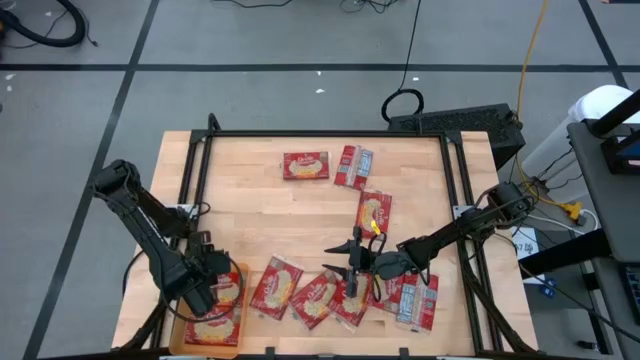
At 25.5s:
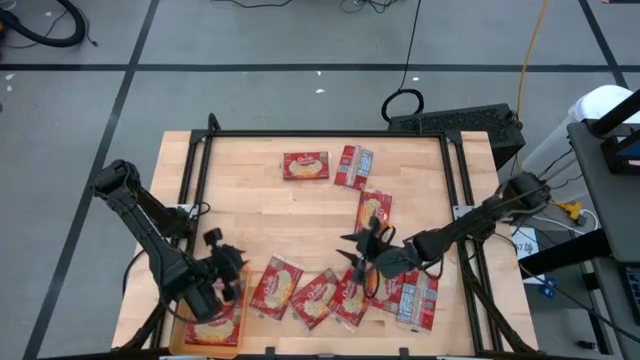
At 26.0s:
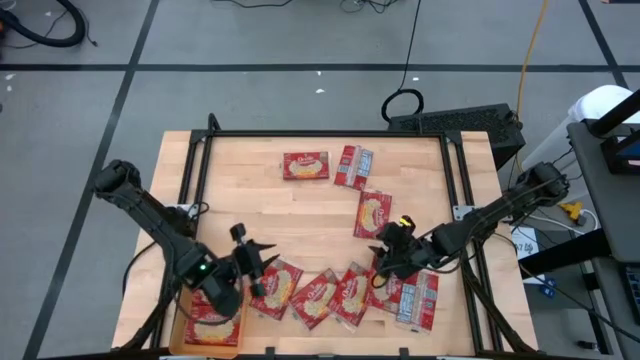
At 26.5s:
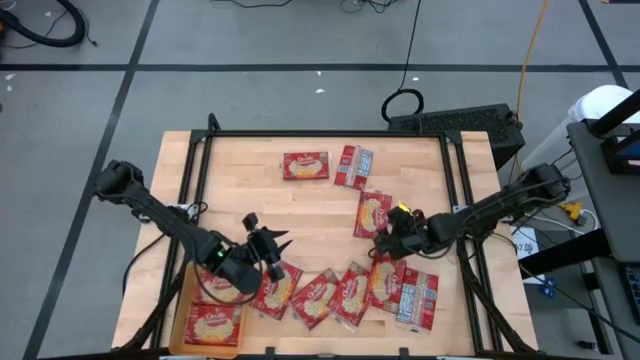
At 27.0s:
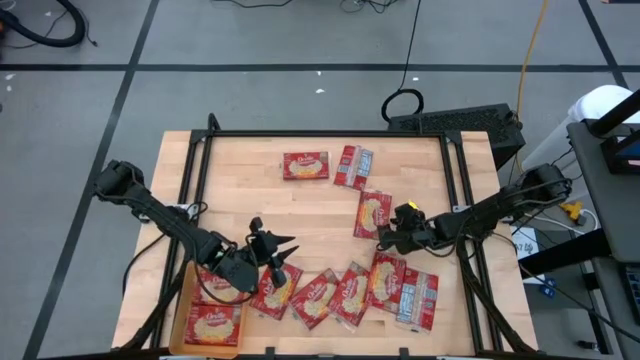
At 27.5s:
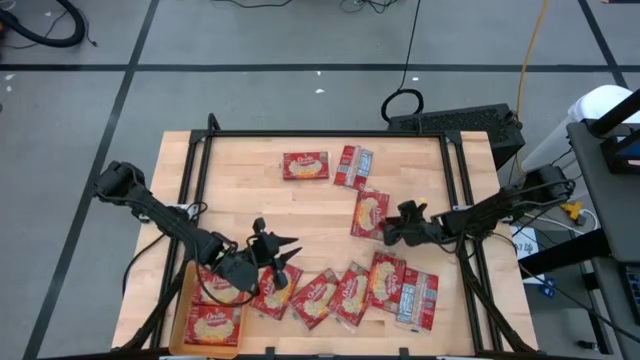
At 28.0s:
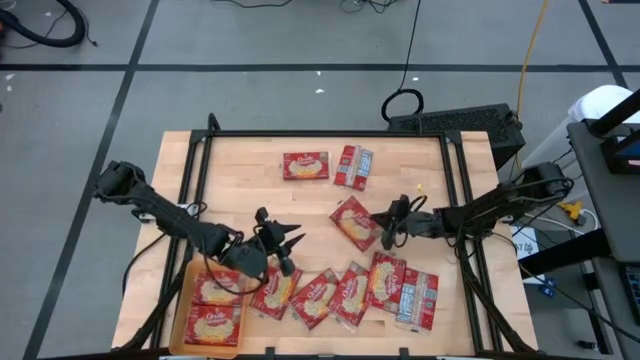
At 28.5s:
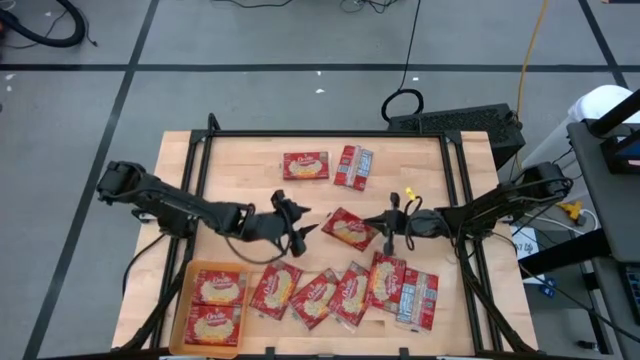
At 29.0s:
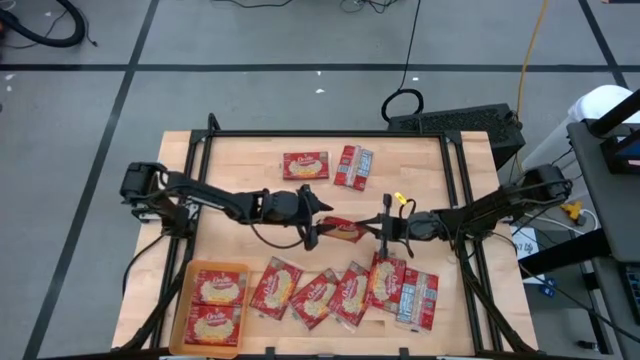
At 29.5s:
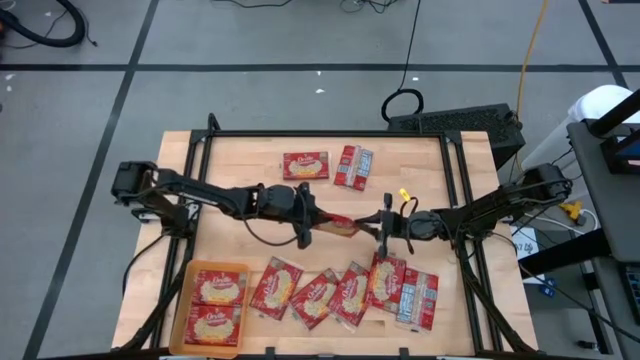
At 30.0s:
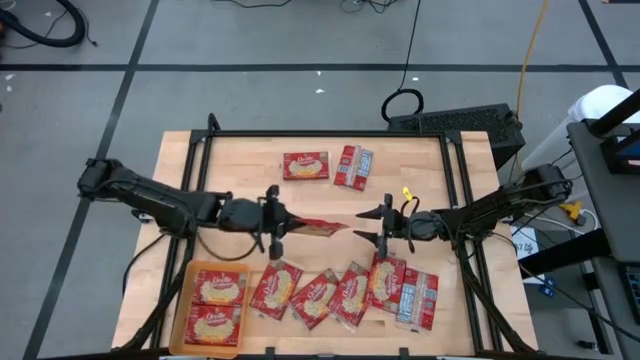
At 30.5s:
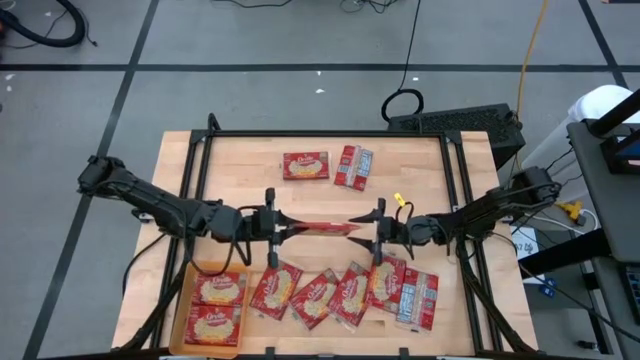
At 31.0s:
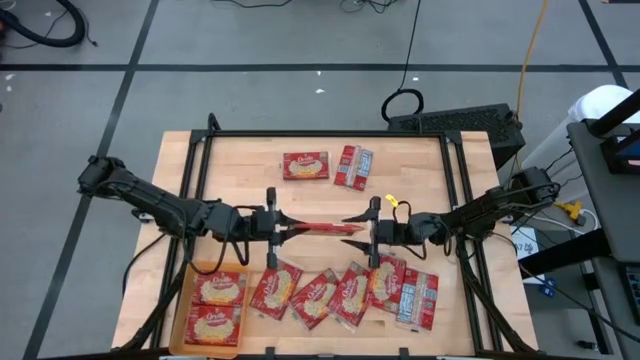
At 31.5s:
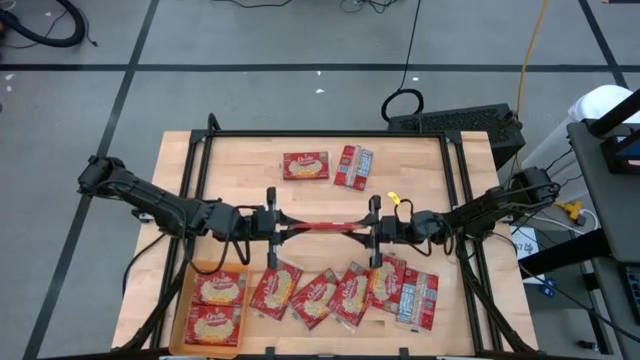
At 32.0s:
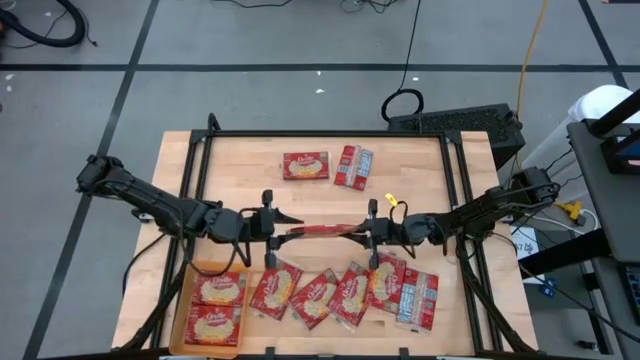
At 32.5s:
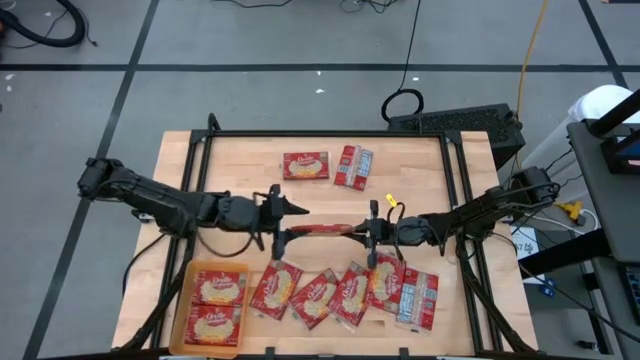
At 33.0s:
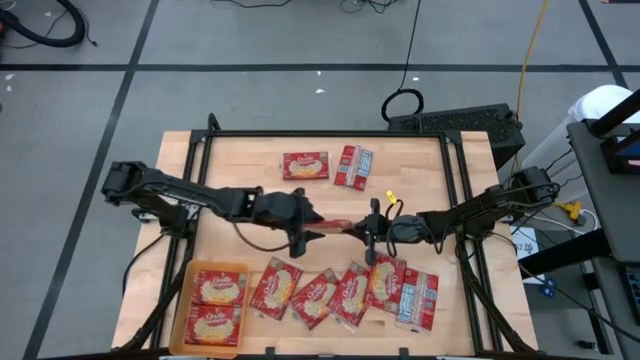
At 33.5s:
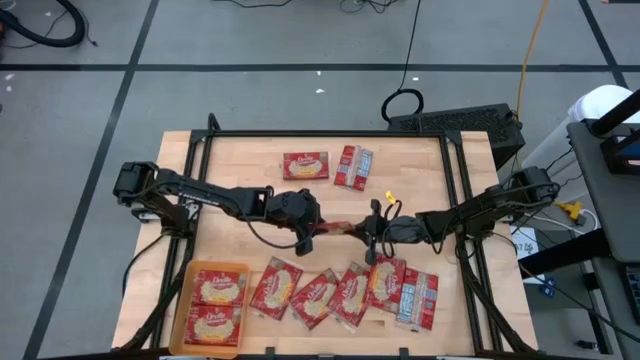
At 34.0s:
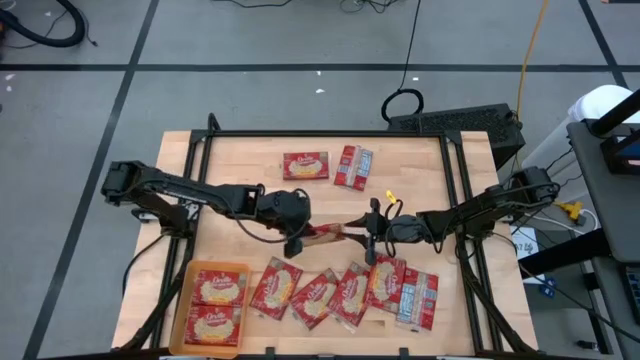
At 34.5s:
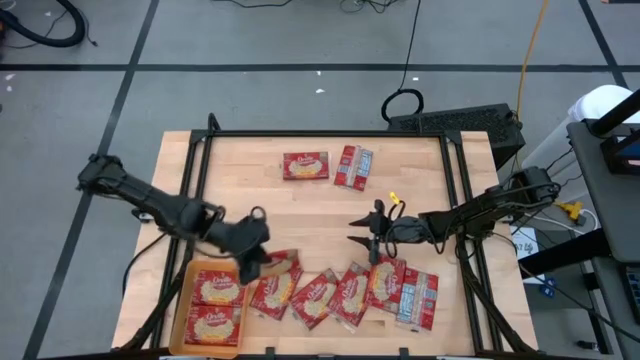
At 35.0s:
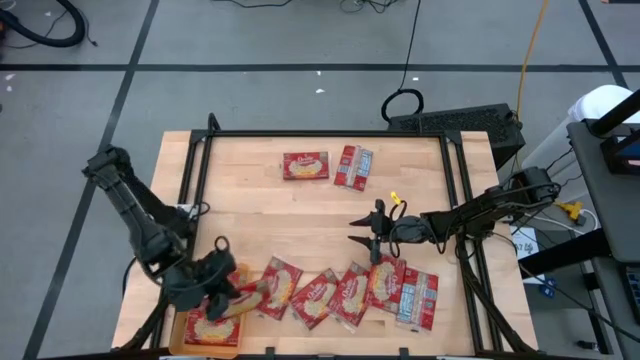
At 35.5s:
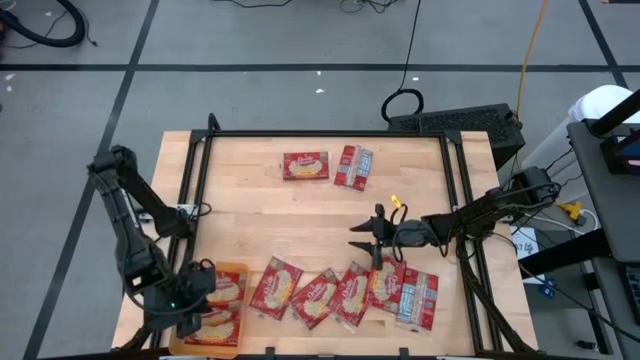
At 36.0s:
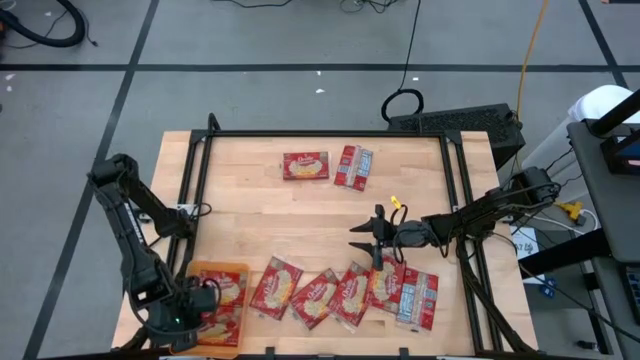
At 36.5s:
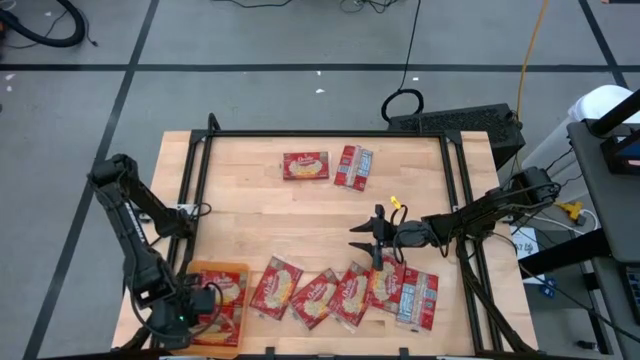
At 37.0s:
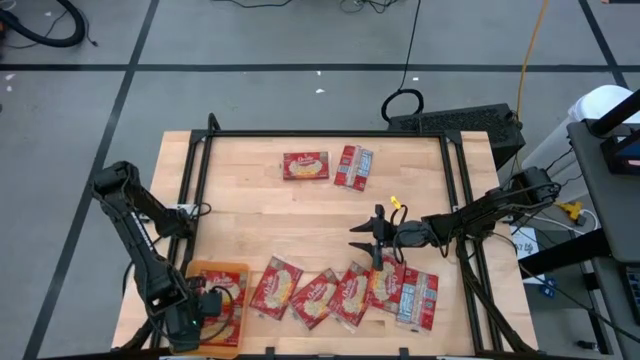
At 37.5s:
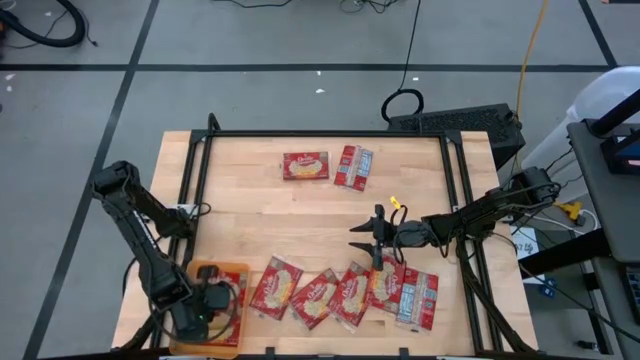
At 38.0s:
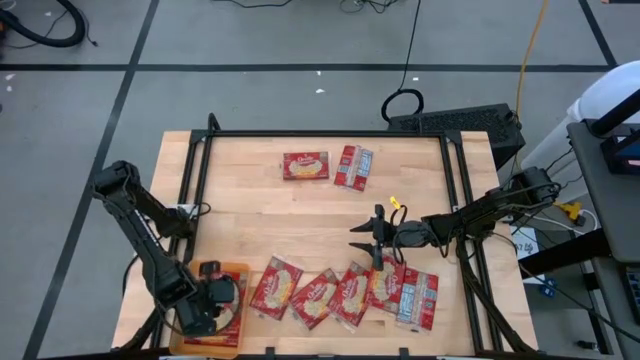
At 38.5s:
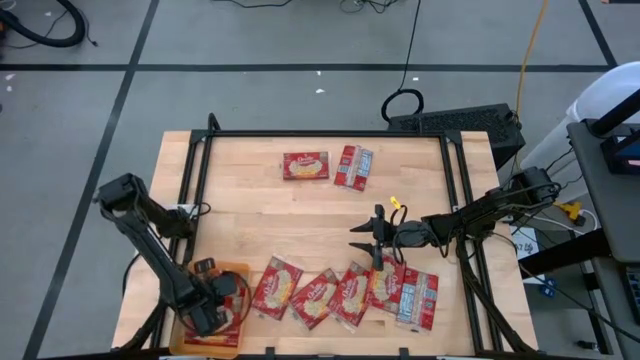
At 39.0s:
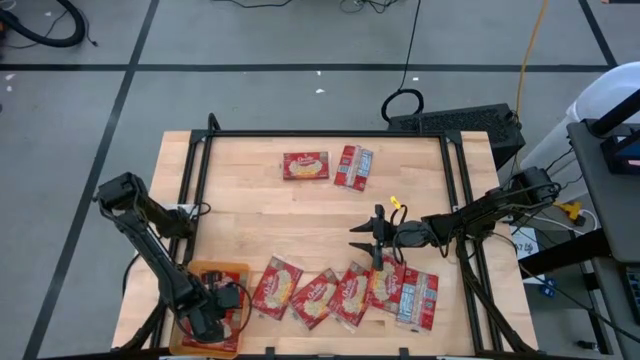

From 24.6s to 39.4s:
Task: Sort popcorn bags into baskets
Put the red popcorn bag into the orange bin

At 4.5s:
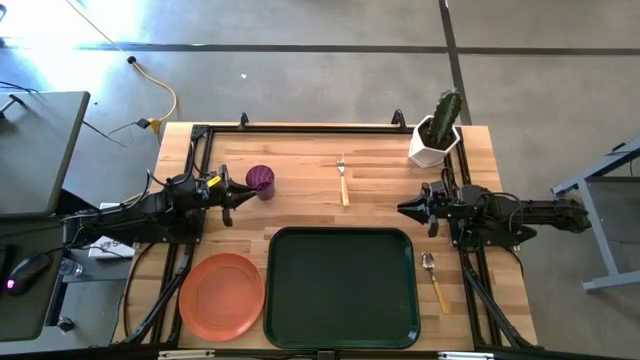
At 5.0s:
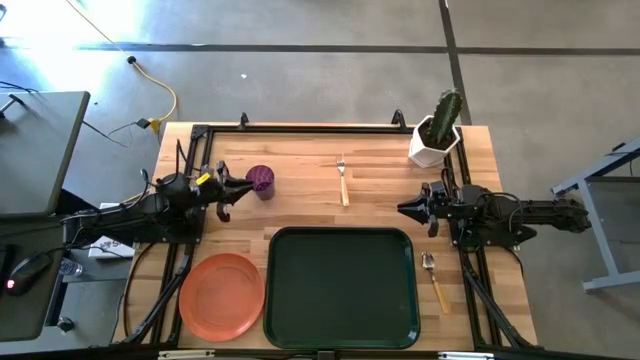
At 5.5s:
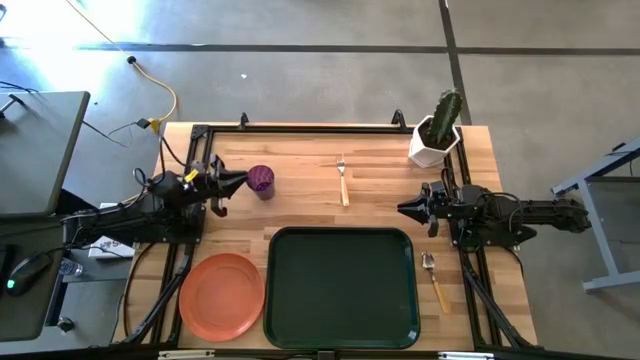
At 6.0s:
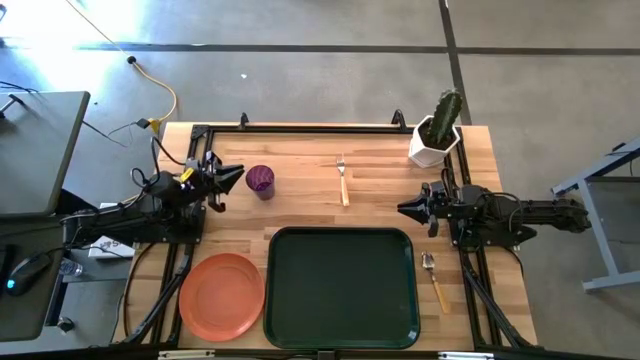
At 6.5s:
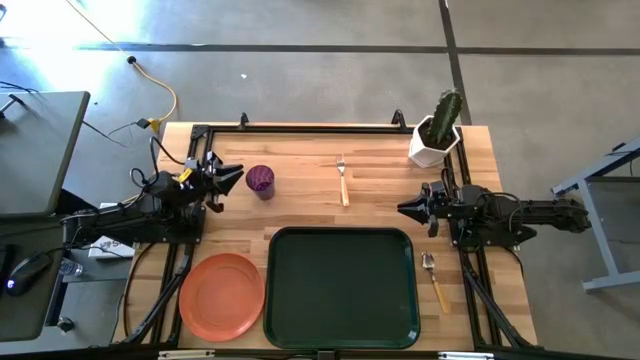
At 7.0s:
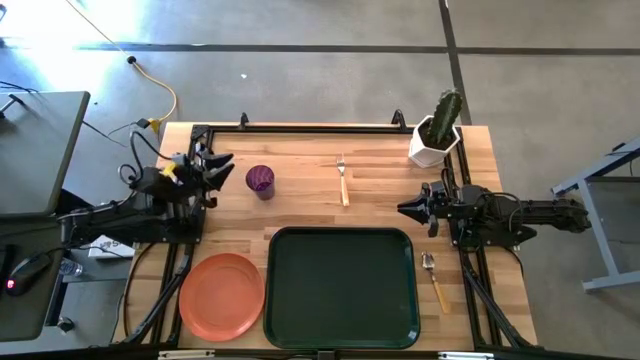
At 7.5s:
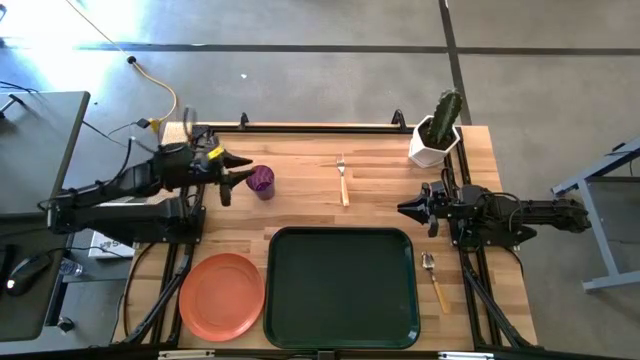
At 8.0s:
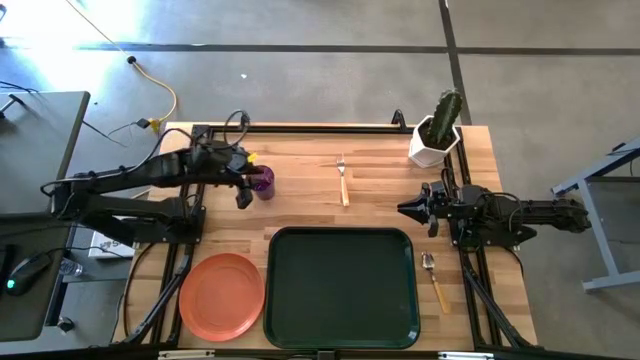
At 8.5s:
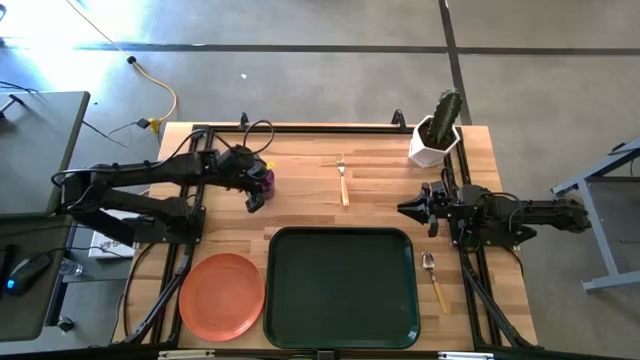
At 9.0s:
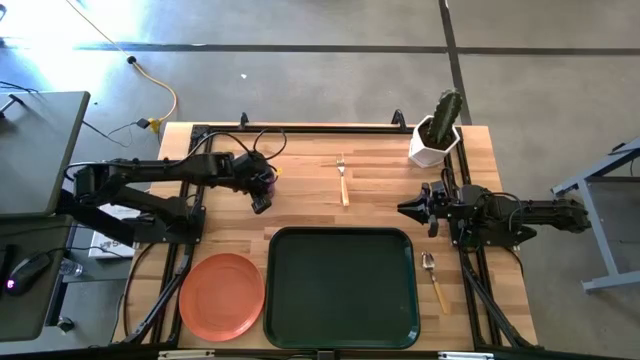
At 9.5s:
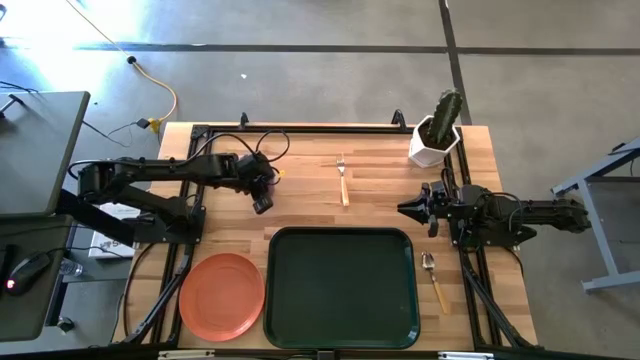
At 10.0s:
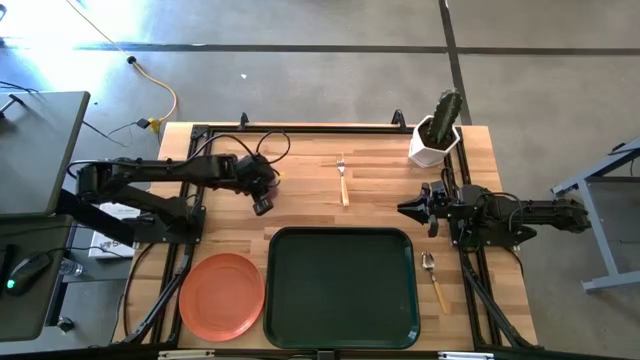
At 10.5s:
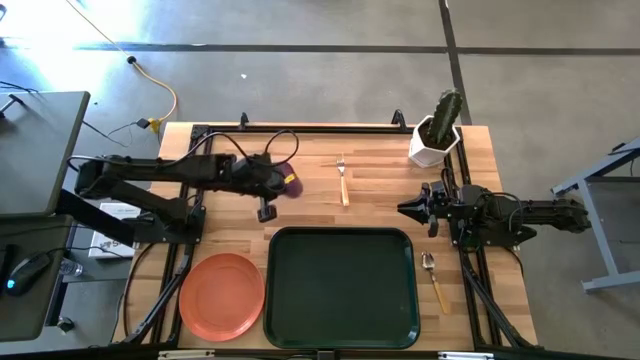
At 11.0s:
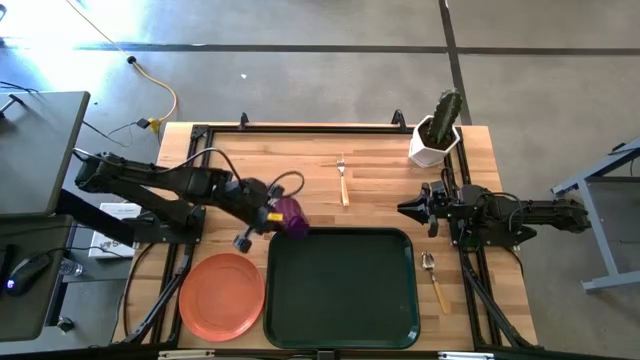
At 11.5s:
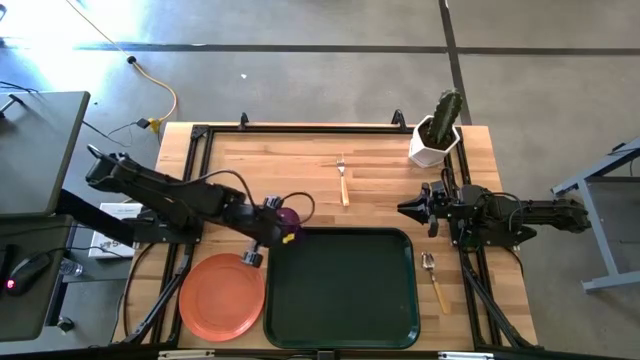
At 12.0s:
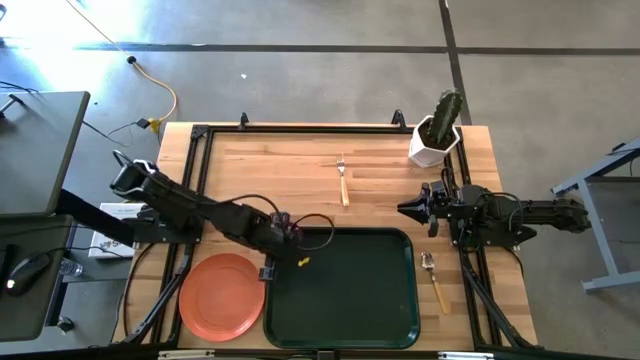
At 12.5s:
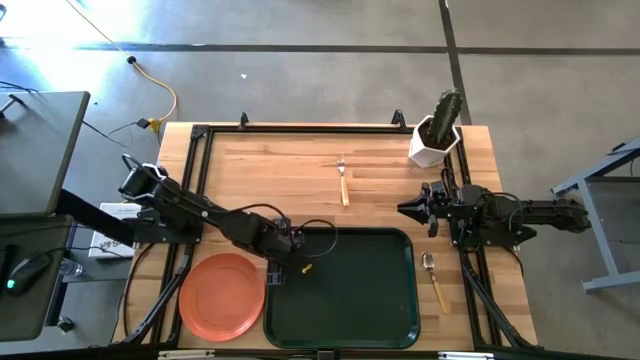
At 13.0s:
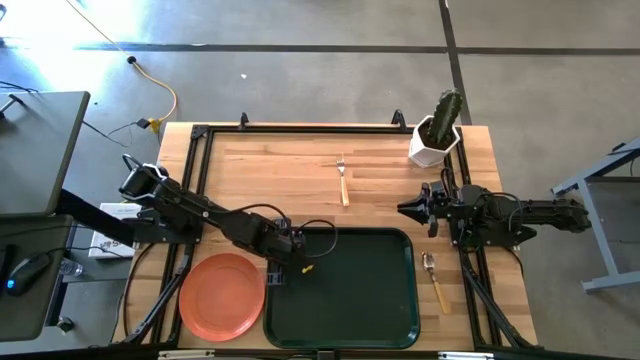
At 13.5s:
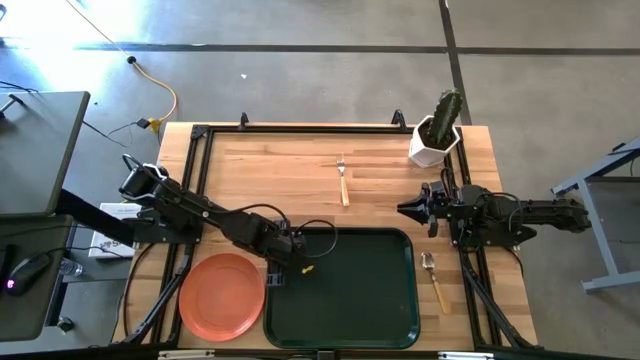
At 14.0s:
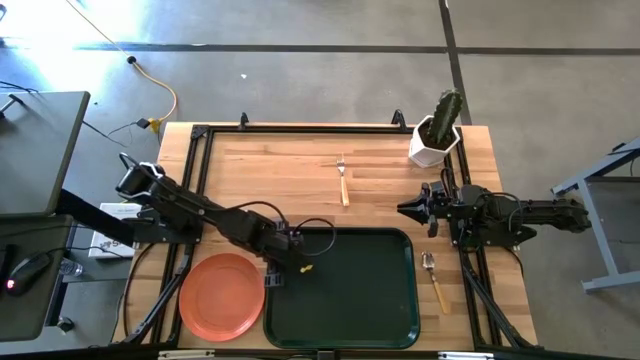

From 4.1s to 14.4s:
Task: Pick and place plate/cup/fork/spoon on tray
Put the violet cup on the dark green tray
